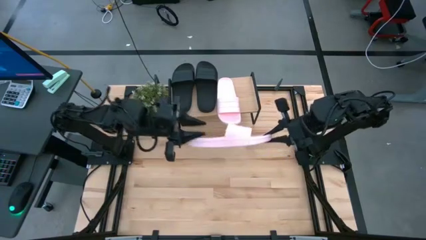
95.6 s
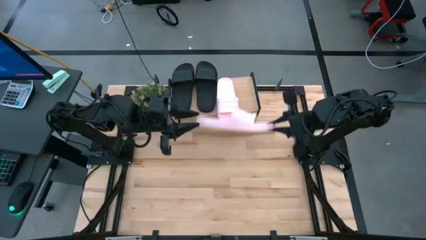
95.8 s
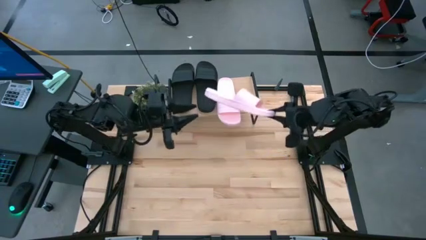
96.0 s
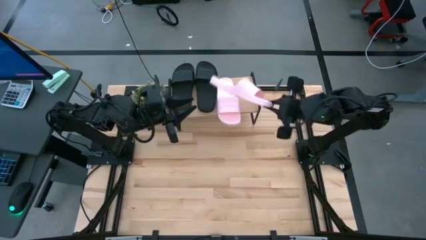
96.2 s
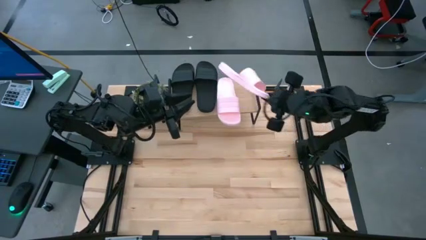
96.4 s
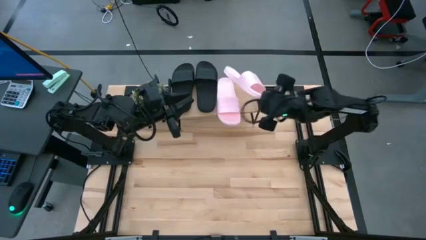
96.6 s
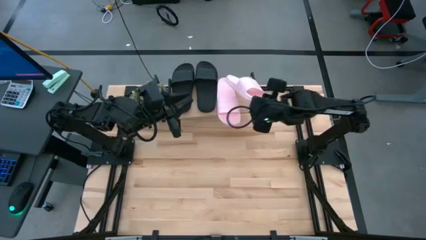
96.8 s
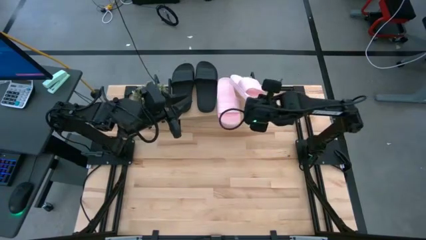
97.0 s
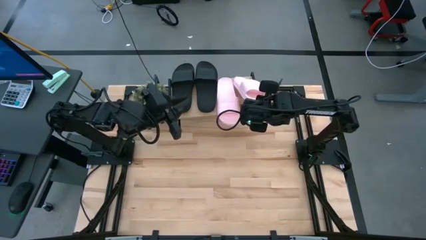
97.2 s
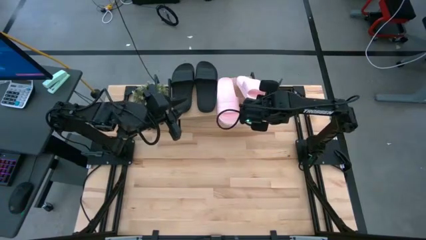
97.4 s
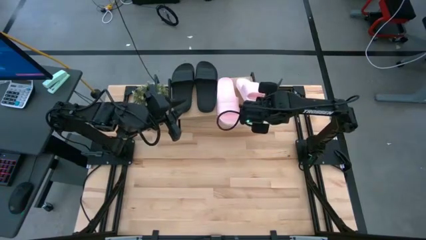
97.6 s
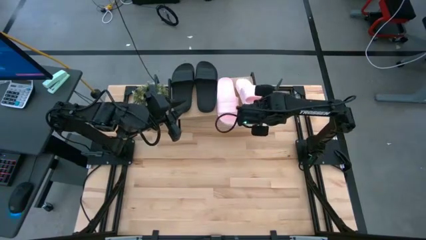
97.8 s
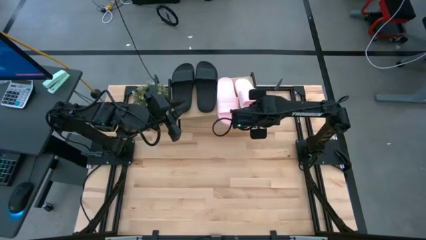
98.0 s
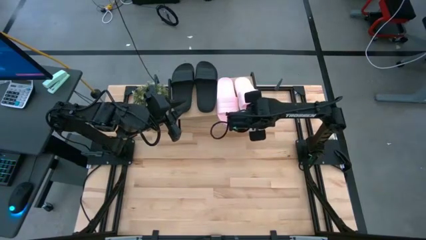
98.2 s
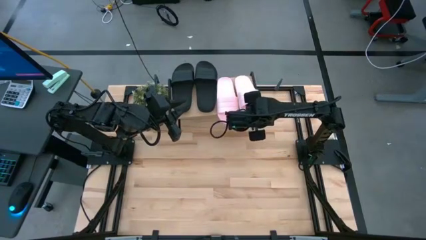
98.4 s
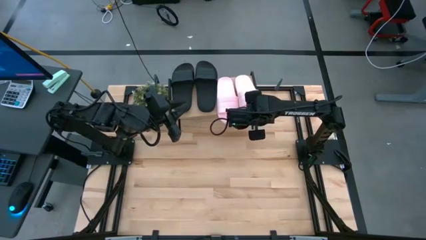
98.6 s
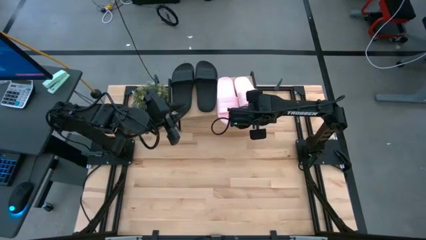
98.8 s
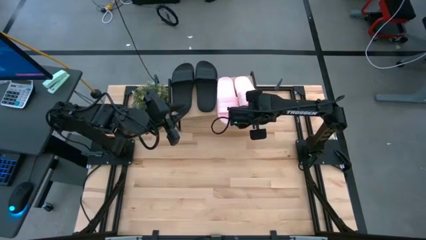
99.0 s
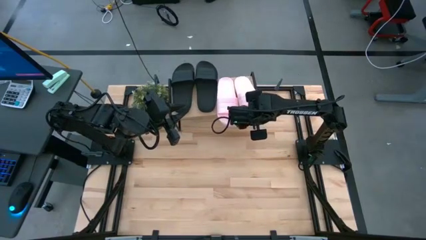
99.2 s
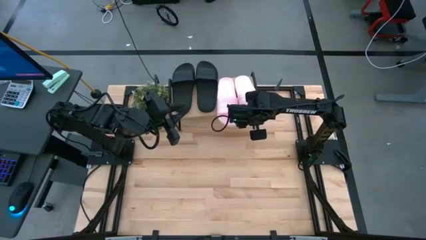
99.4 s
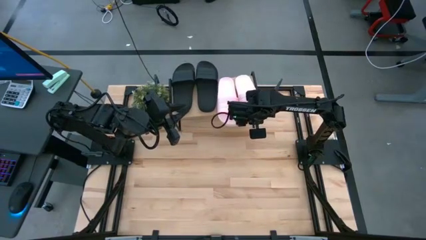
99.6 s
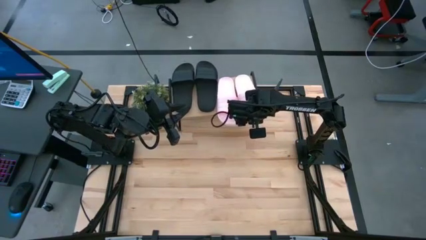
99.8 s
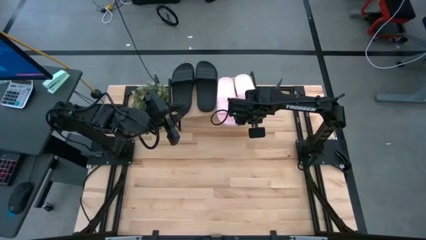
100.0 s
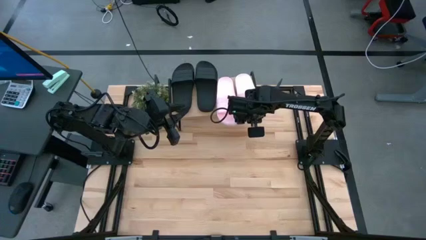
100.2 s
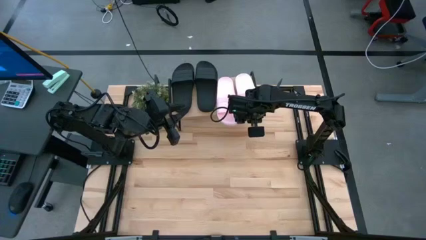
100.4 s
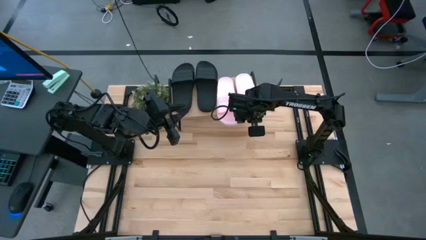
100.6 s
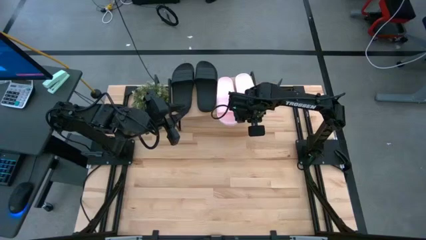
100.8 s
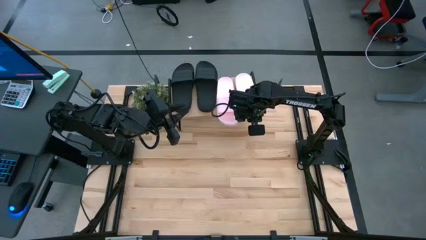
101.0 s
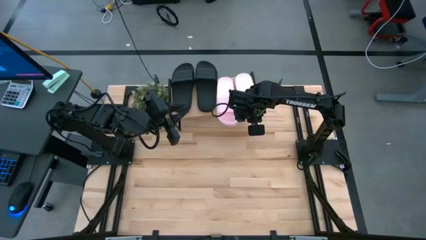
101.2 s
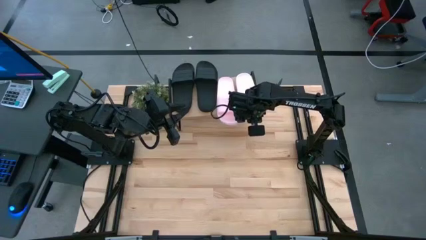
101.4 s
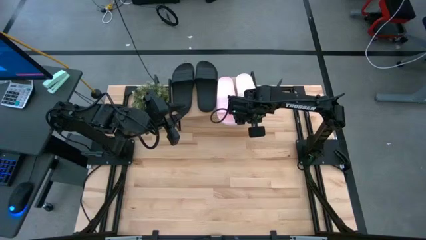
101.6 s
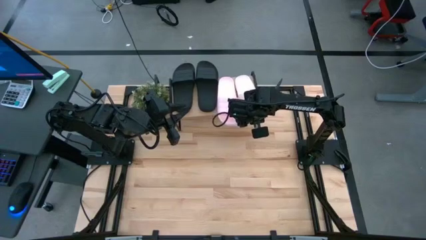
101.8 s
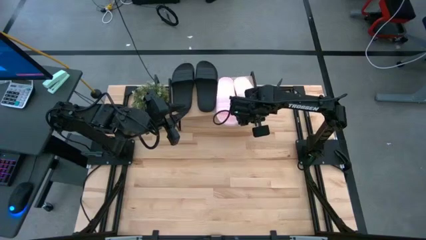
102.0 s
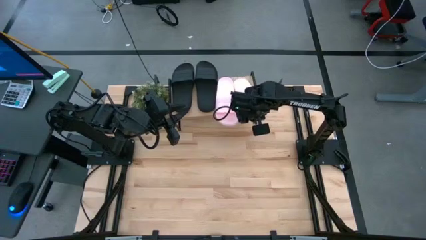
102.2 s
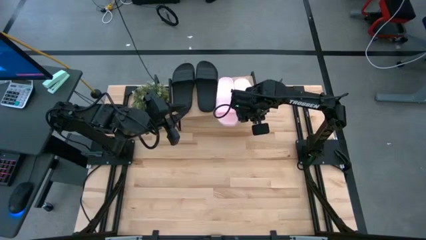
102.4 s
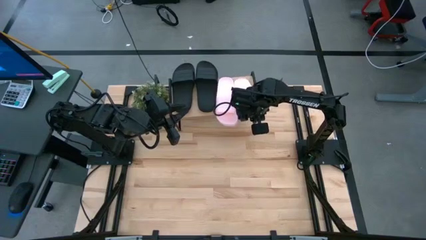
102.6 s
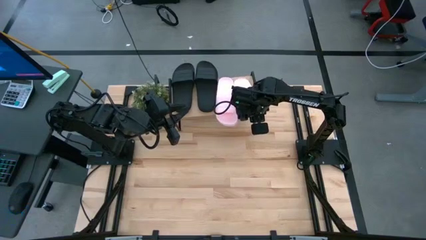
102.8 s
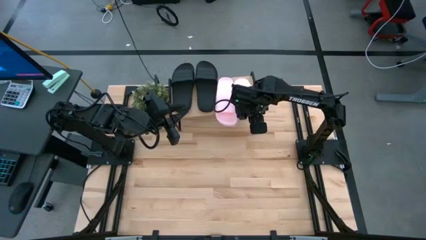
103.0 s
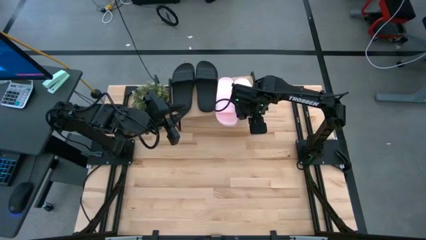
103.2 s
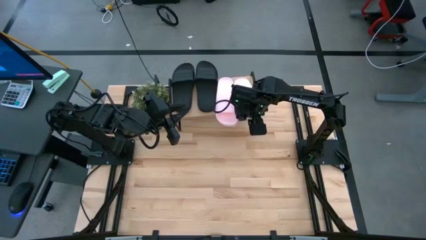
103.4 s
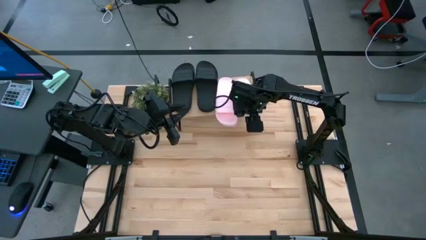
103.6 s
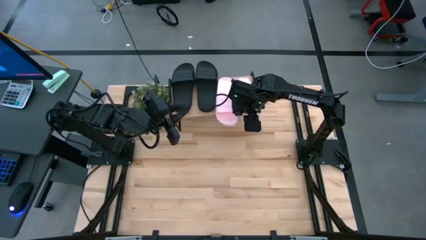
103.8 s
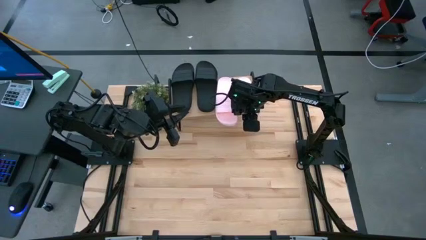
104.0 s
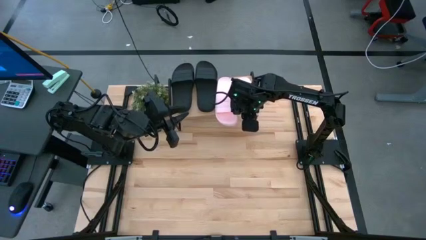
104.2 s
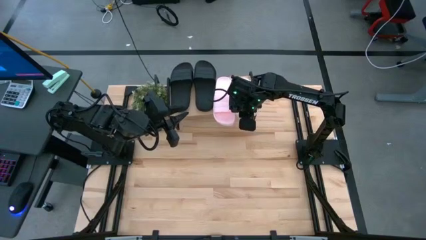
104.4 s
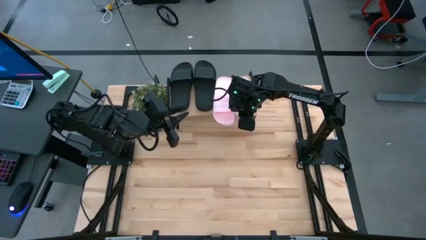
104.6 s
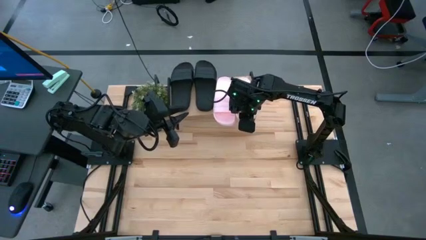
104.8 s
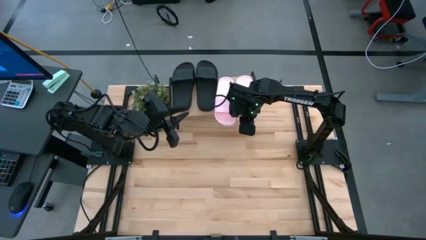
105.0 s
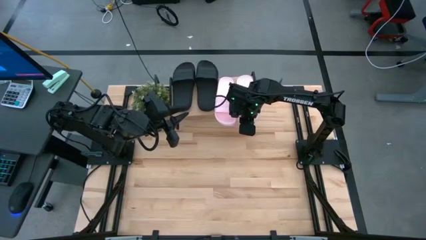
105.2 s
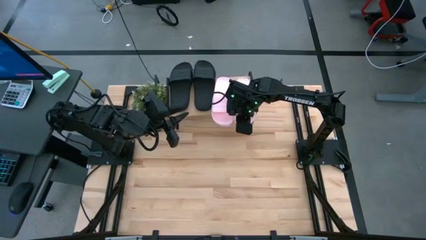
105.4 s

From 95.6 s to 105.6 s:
Task: Pick and place slides into the shelf
Put the pink slide on the shelf

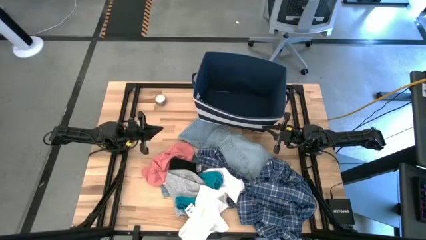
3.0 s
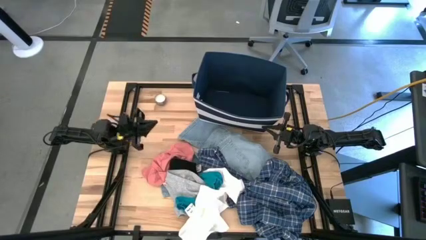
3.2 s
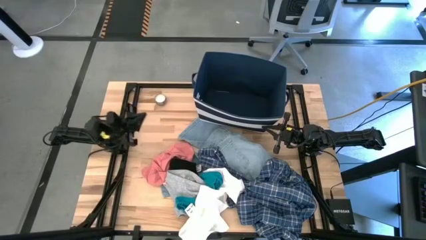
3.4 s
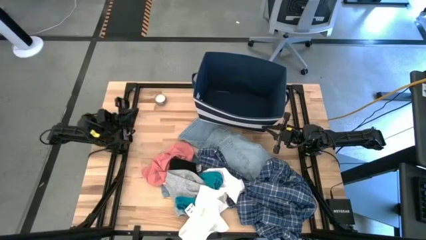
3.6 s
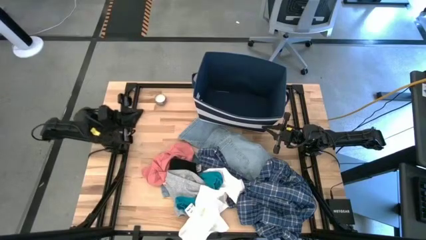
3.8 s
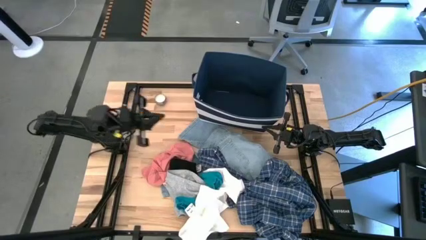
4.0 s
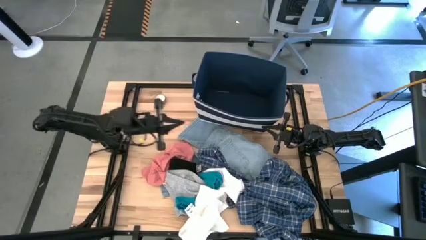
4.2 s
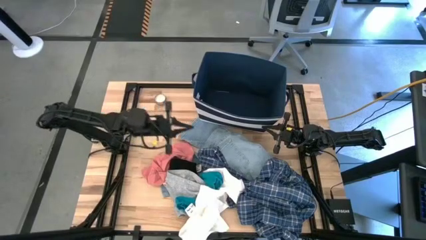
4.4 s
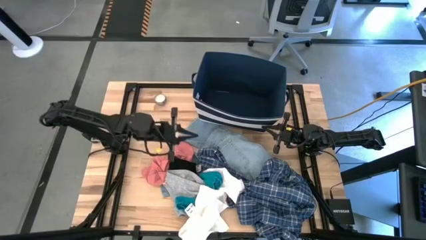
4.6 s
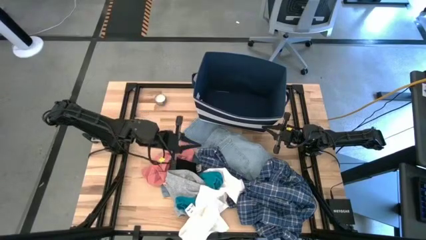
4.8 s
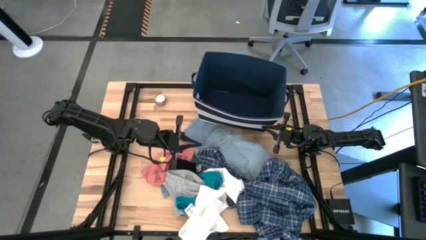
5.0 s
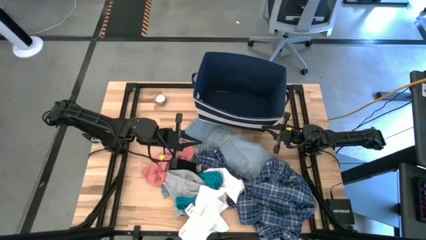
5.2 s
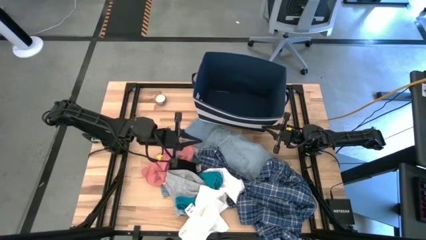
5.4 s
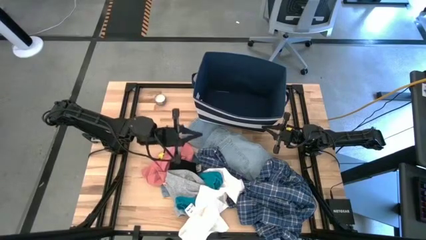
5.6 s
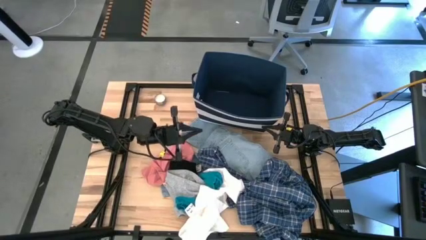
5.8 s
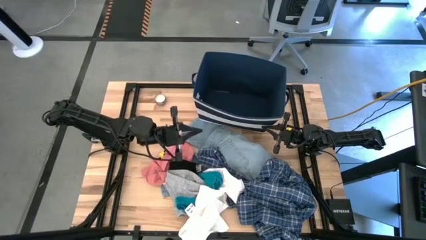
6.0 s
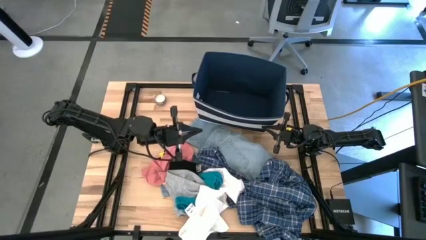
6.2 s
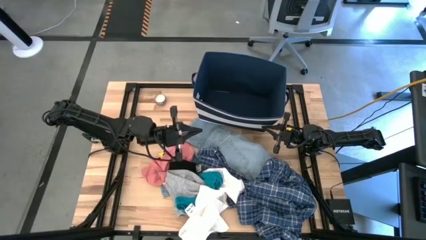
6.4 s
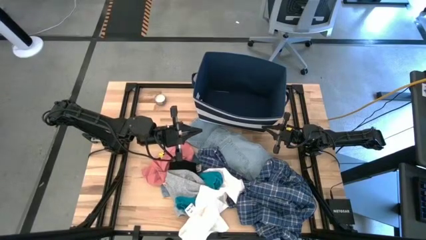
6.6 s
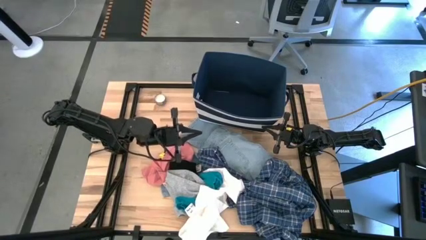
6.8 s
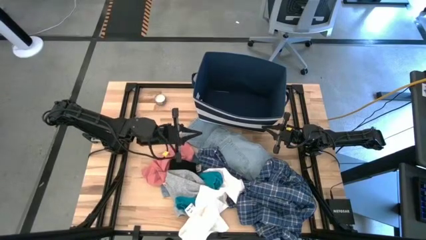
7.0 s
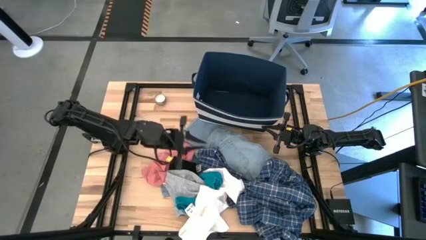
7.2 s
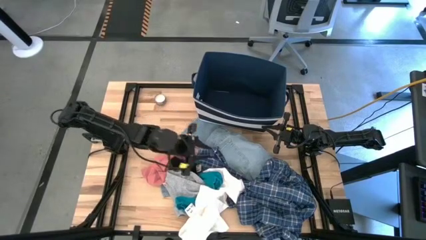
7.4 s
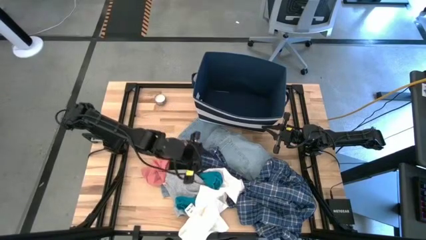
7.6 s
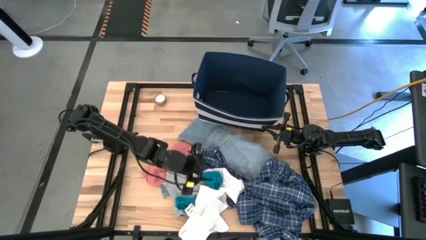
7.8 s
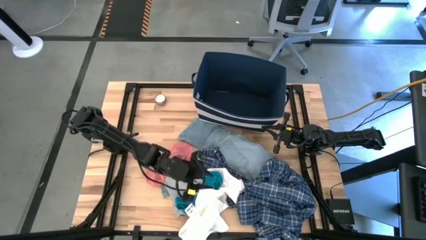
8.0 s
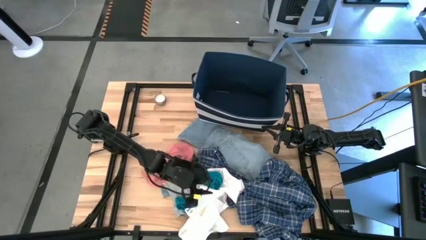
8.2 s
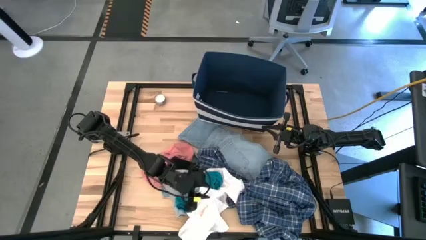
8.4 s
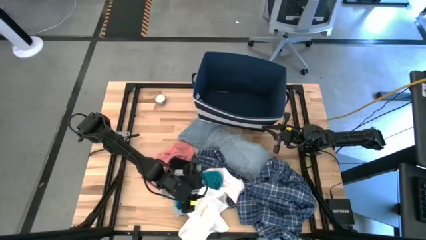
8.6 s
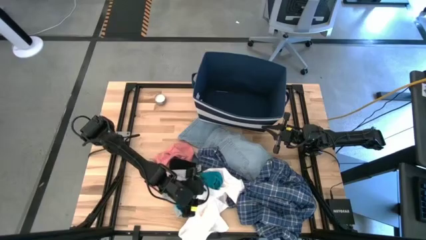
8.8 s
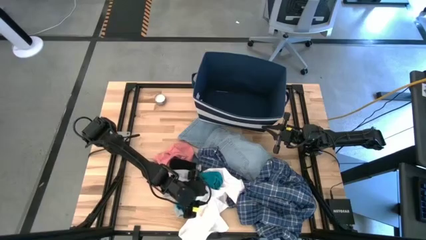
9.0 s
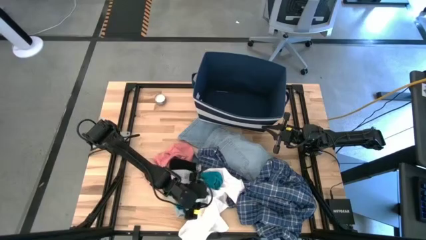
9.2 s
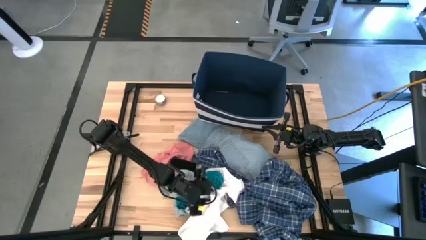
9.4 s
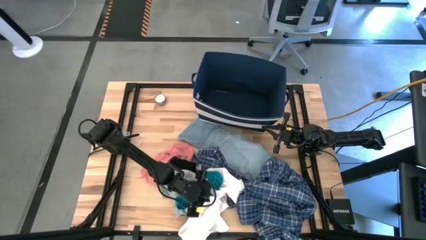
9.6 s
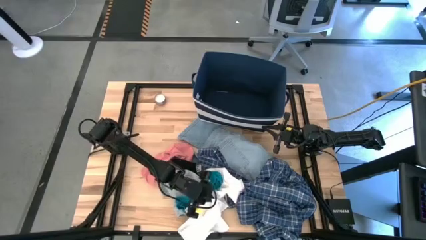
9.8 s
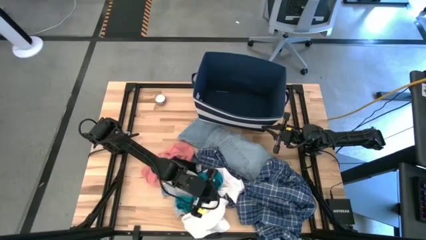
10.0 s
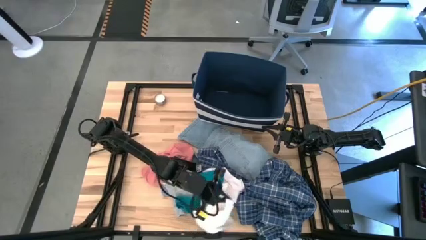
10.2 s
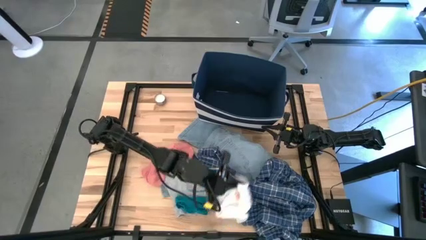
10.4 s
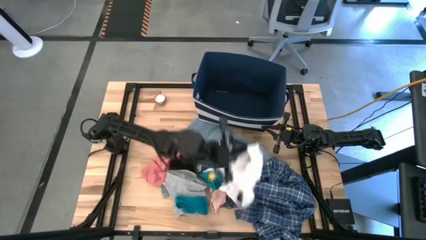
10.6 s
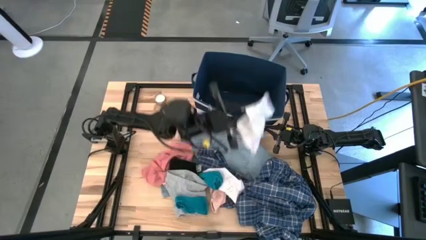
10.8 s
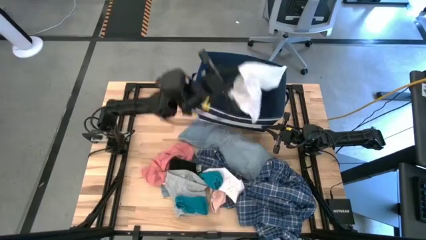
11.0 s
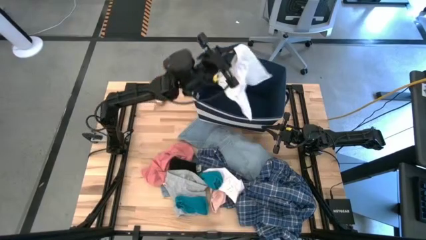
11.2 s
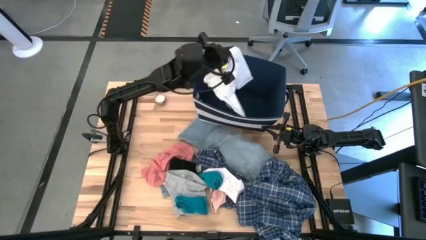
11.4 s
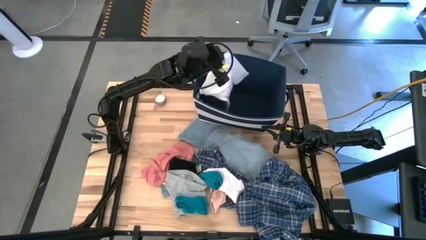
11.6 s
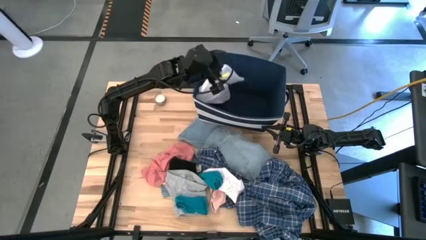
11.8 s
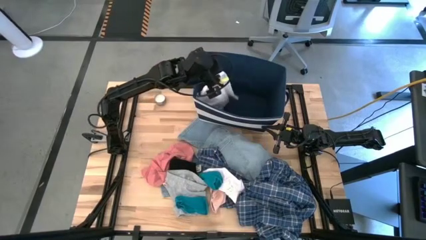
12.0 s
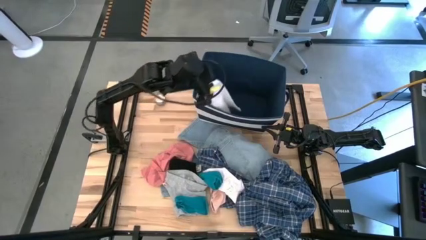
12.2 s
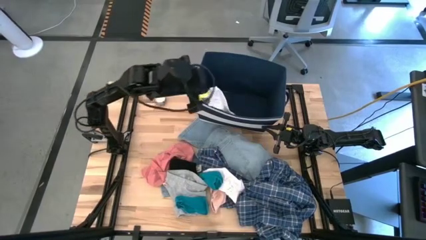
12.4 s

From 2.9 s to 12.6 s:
Task: Sort clothes
Put the white shorts into the blue laundry organizer
